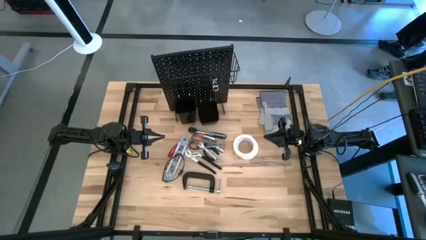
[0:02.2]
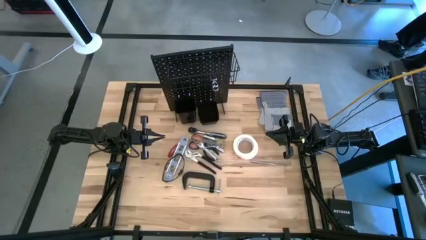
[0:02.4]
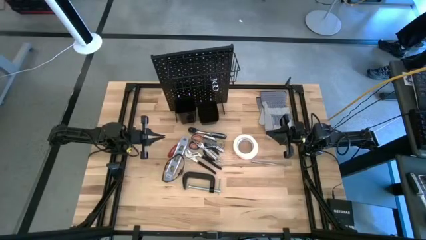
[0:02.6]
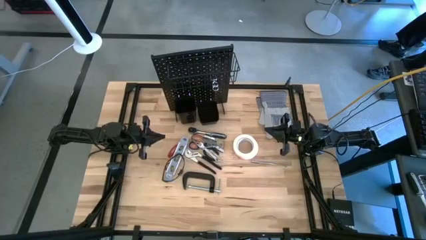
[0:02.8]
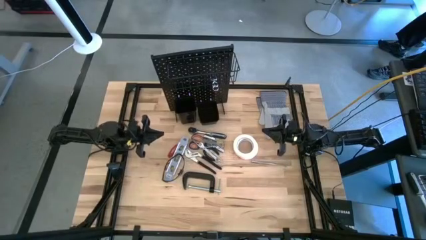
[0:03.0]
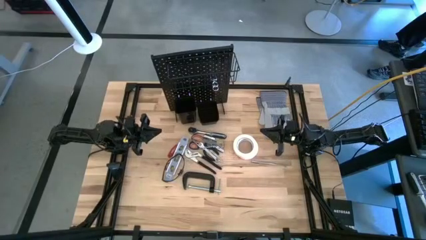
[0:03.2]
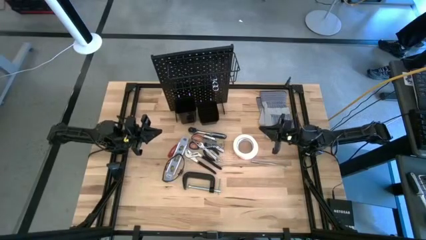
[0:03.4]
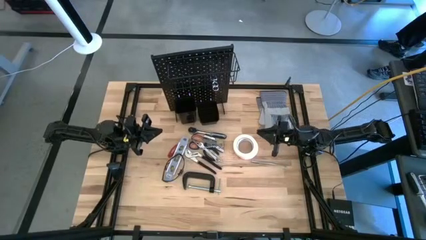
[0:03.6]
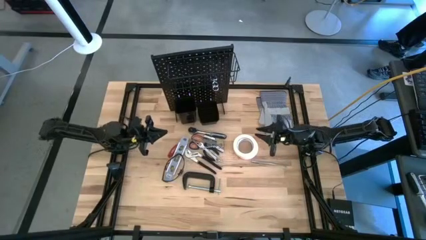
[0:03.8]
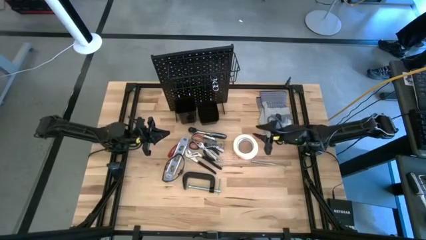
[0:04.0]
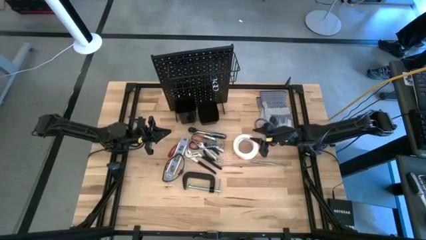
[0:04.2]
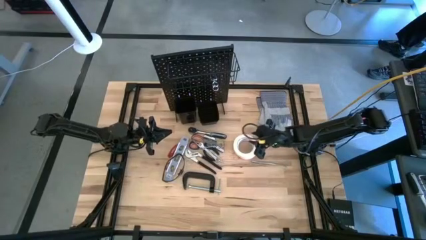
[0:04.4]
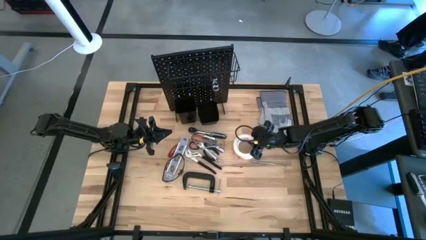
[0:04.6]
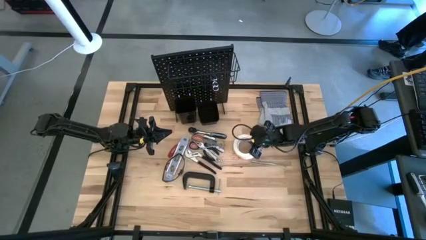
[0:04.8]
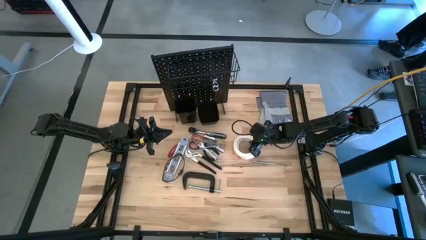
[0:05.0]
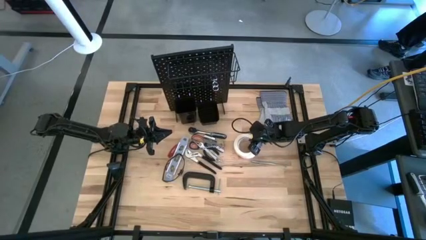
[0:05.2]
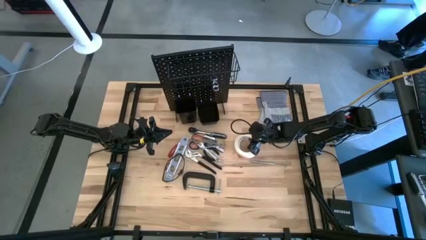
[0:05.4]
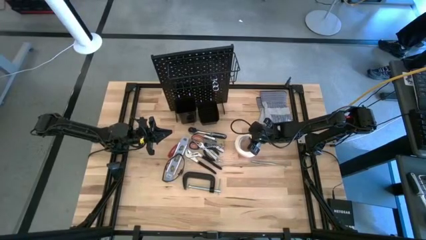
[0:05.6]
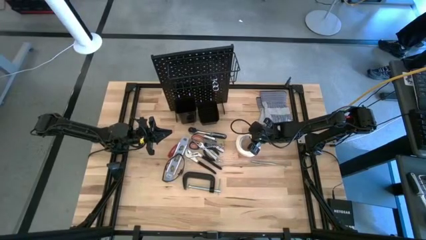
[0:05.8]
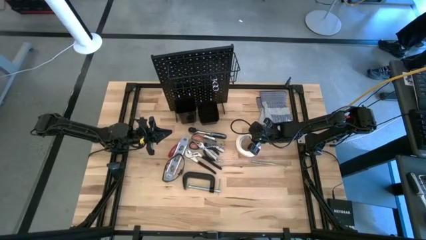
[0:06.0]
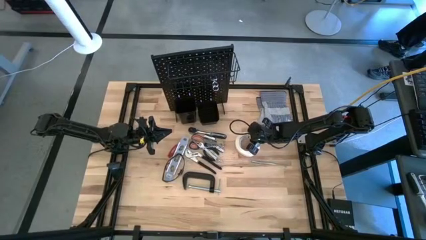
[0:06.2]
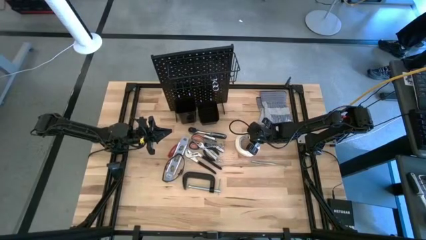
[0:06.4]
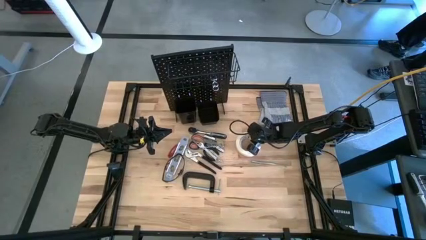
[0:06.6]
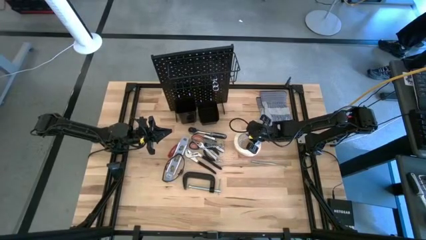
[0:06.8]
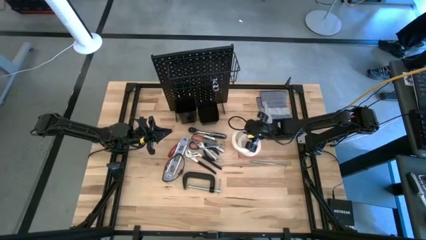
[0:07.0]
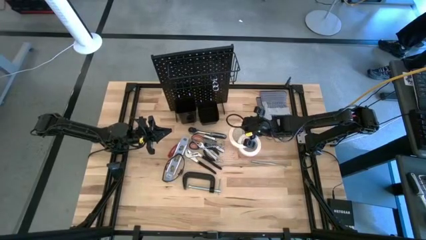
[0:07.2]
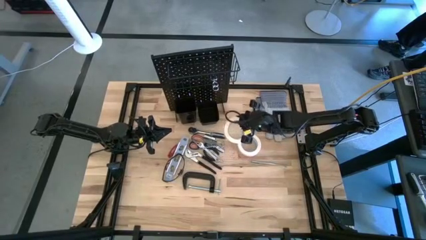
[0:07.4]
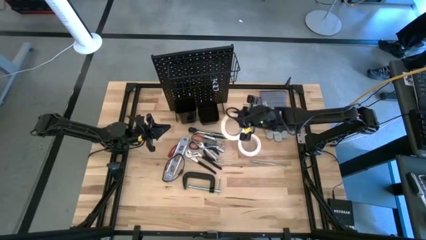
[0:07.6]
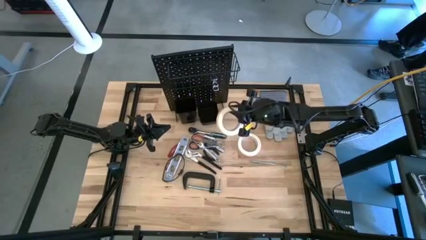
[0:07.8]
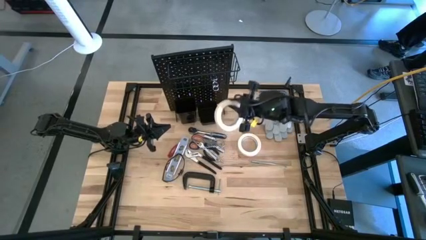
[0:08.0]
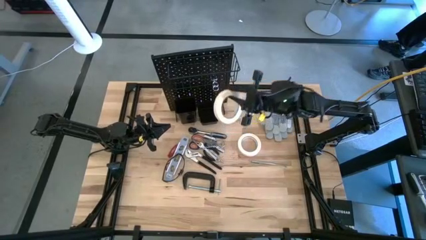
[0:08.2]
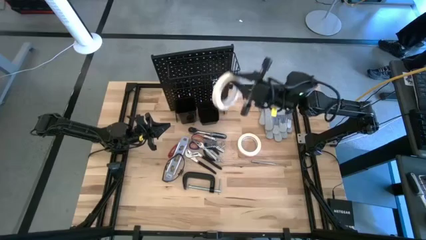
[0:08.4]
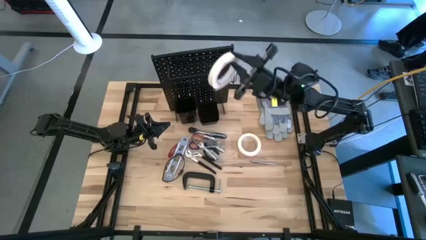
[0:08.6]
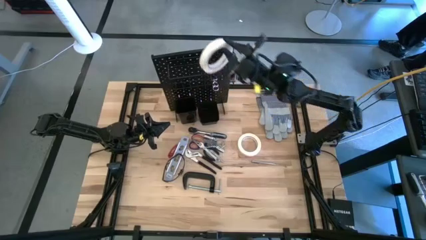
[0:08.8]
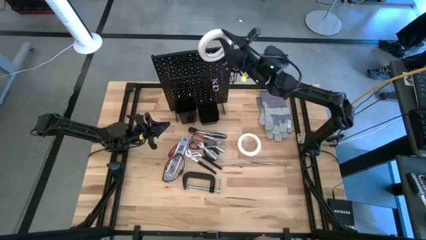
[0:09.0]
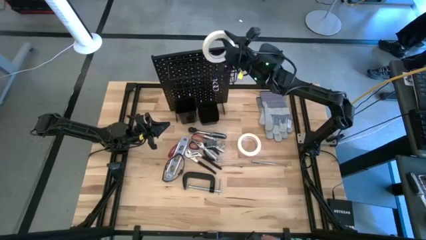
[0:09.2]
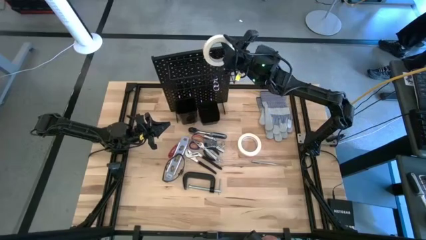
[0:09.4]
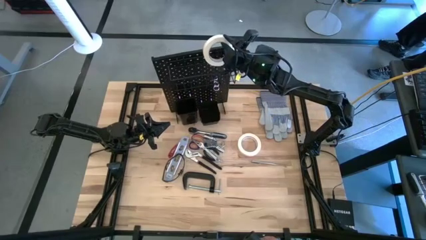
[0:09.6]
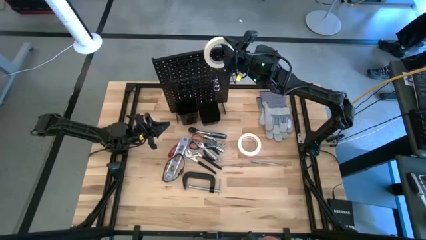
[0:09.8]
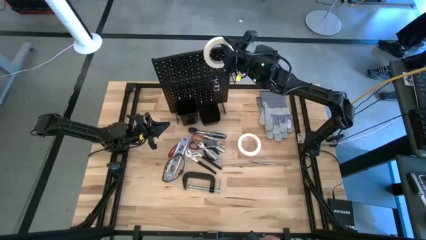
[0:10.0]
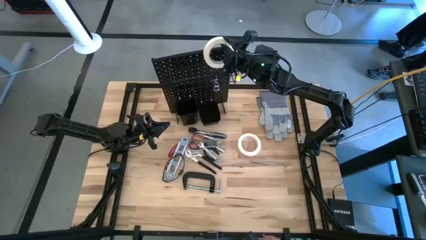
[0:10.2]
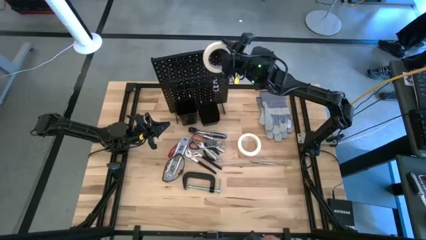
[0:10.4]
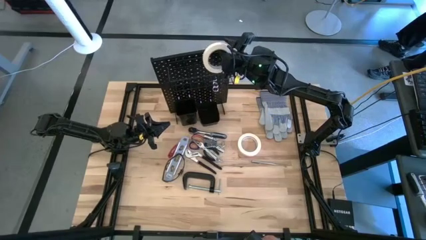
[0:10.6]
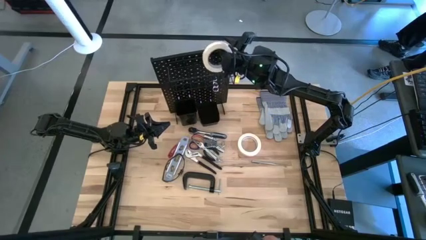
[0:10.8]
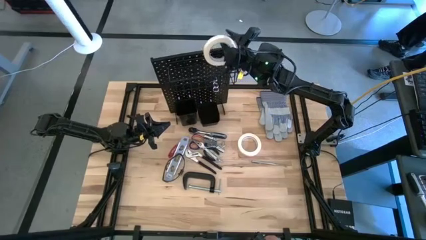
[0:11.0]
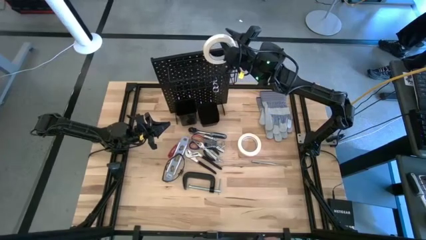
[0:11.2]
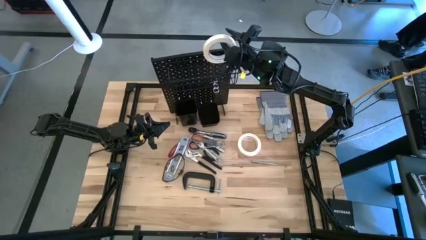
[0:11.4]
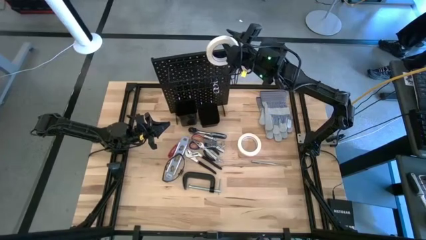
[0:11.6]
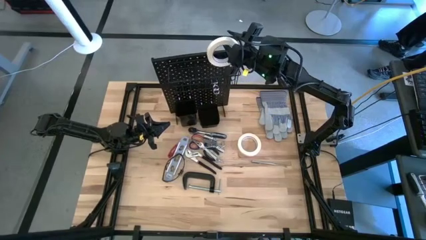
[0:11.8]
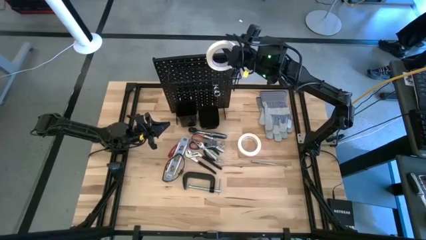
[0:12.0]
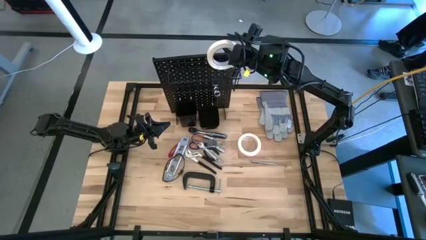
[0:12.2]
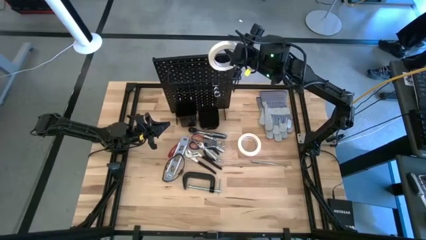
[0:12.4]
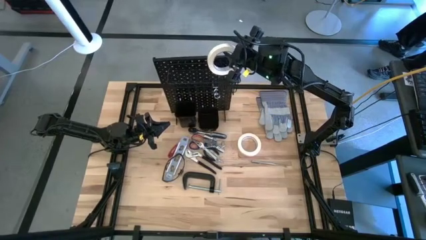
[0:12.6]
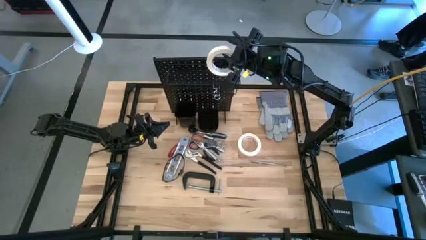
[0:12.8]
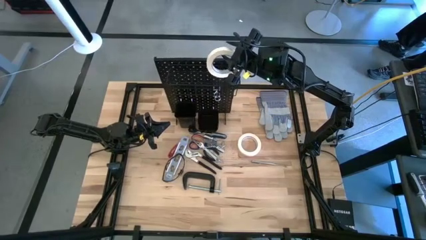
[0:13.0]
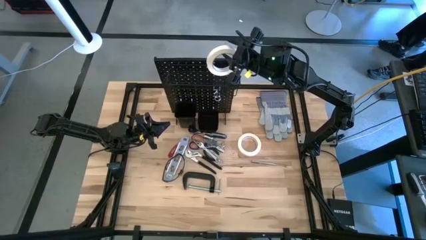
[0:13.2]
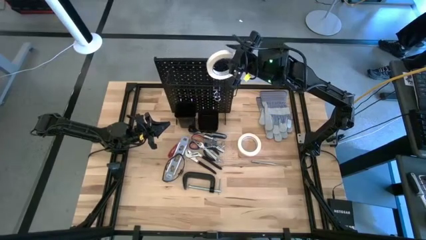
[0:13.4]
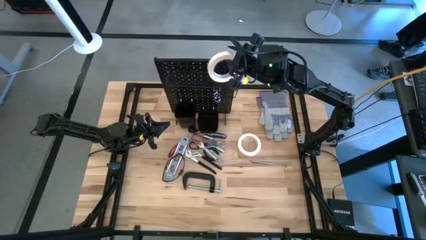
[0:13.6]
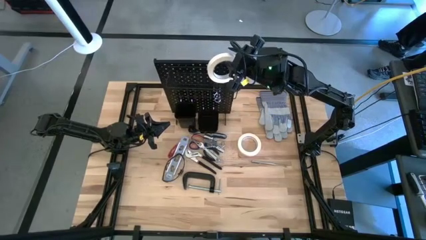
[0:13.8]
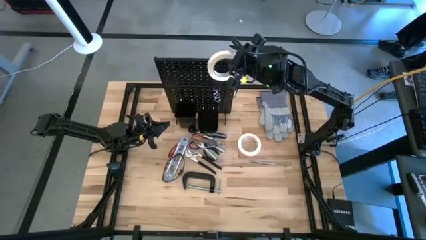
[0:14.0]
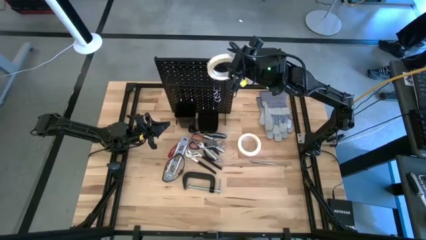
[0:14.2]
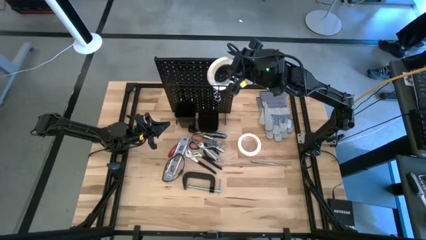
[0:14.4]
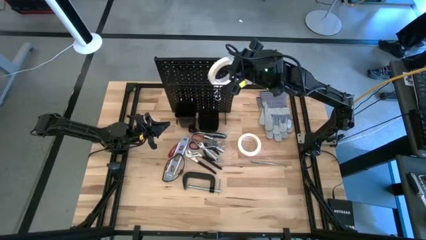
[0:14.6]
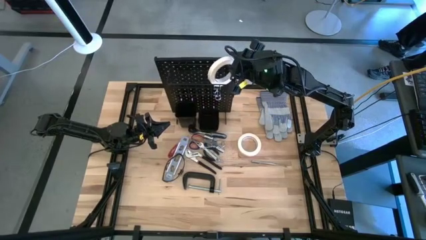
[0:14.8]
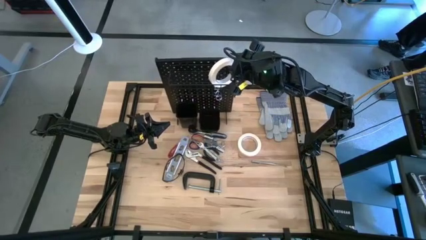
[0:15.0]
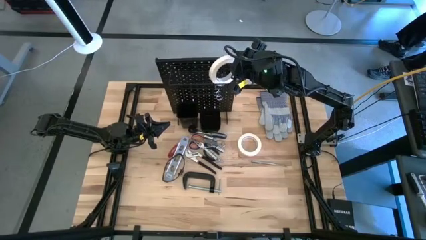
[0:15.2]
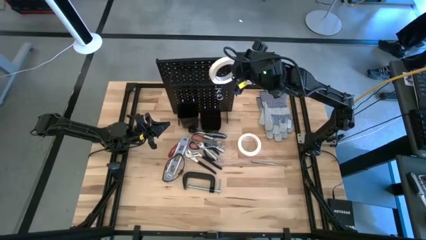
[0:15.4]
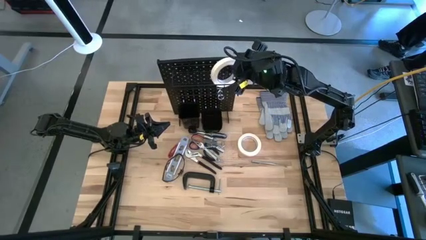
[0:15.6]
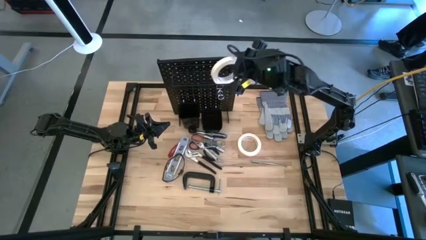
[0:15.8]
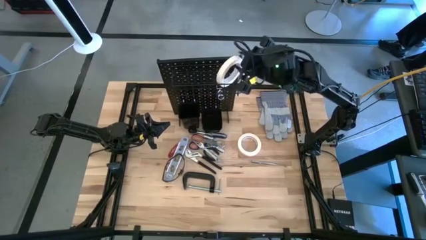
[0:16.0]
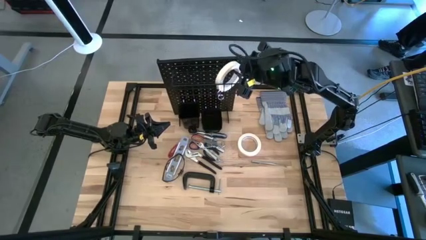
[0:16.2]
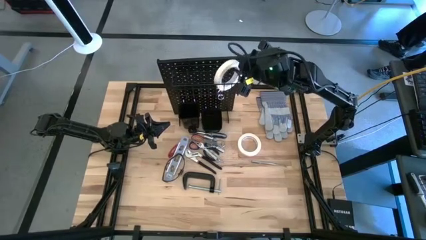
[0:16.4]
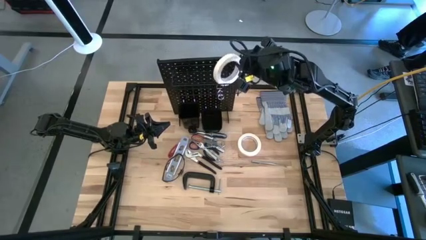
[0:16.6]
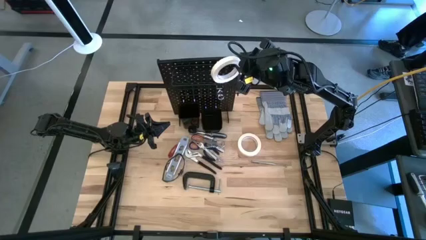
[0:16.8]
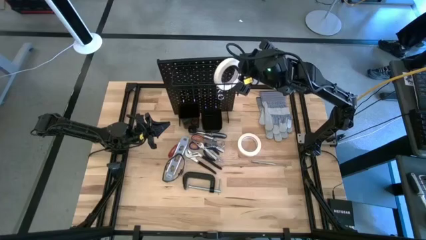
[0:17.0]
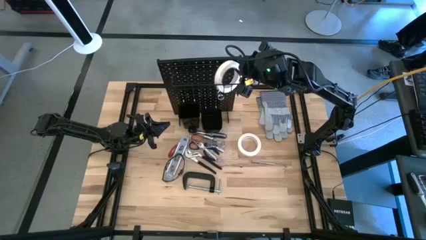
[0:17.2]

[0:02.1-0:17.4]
Task: Hang tools onto peg board
Put the white tape into the wire basket on the pegboard
